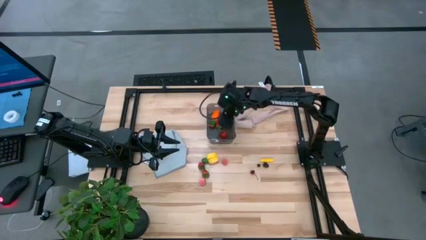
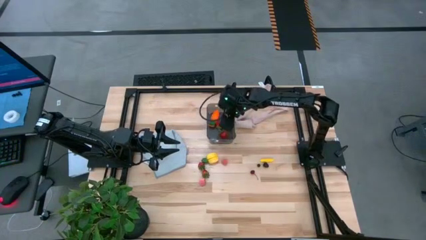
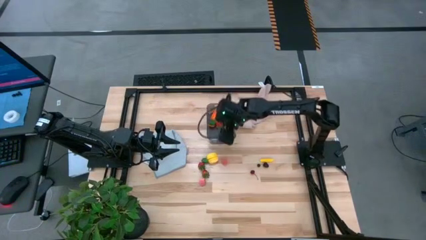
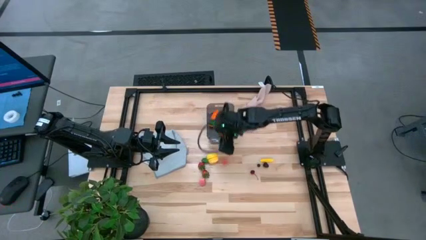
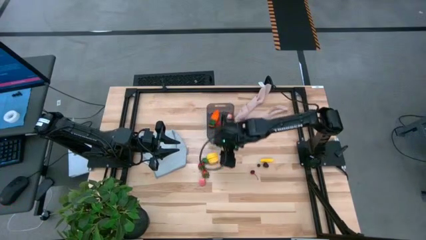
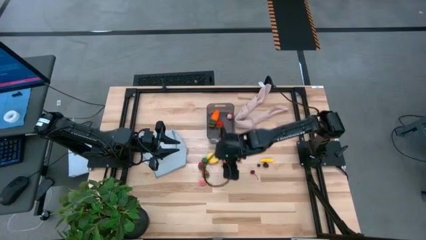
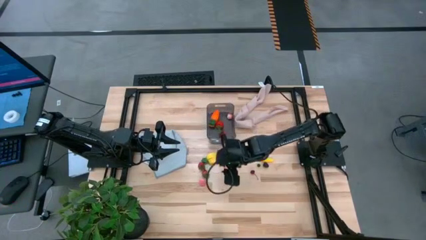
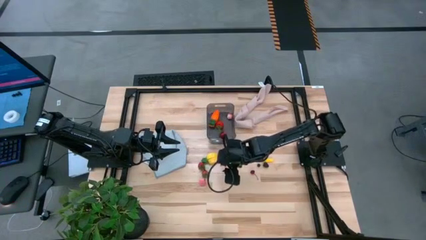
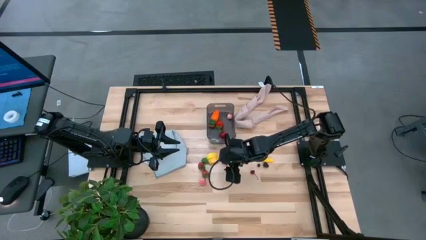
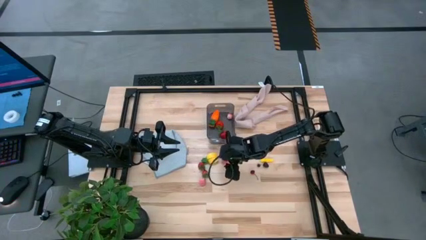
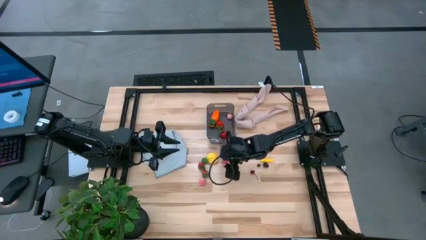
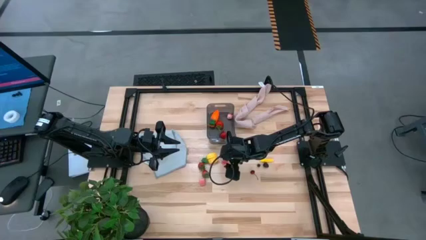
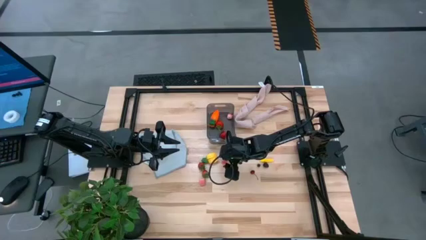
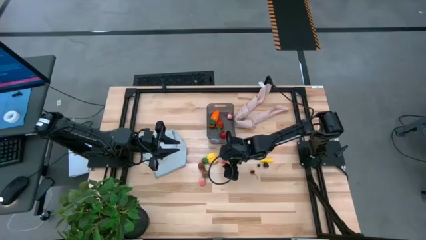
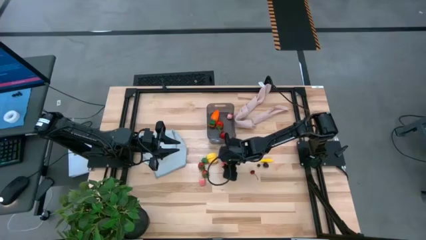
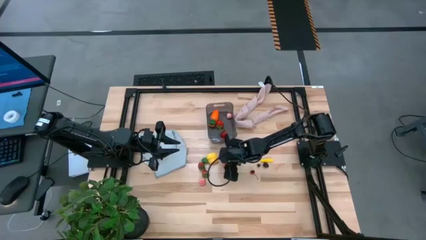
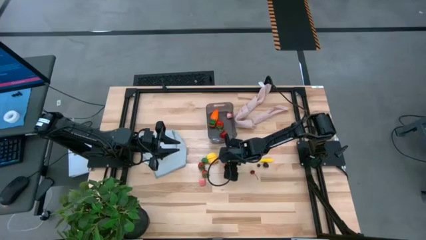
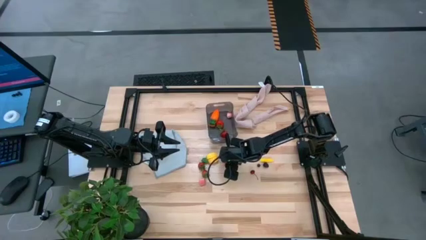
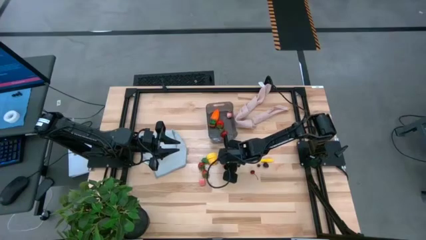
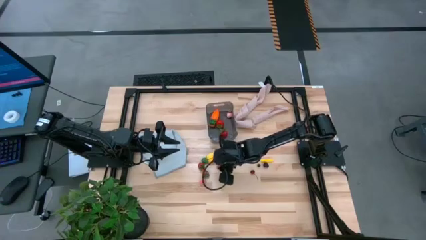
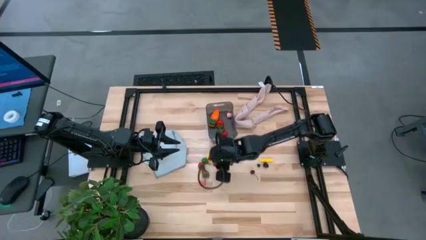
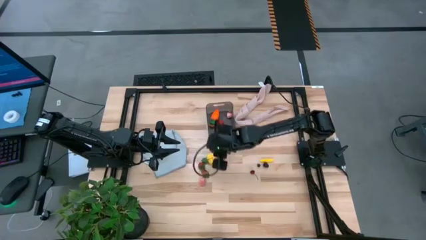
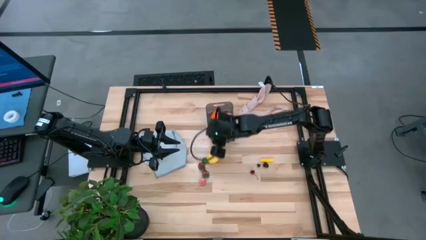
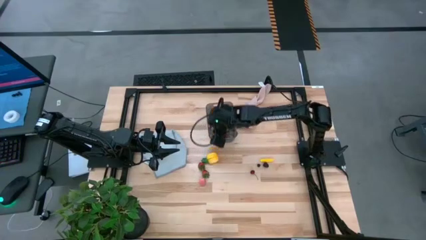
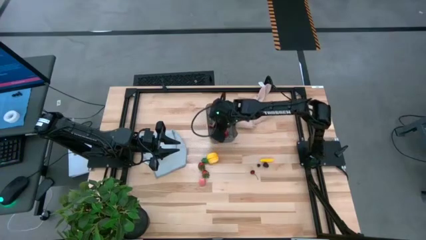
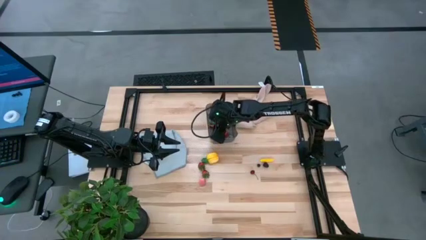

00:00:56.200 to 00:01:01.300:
Task: Pick and placing Produce into tupperware
Put the pink peach into the black bin

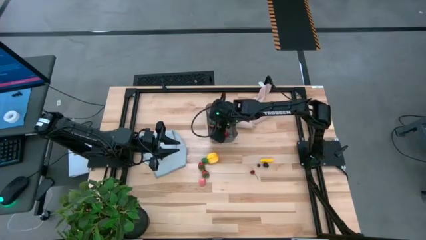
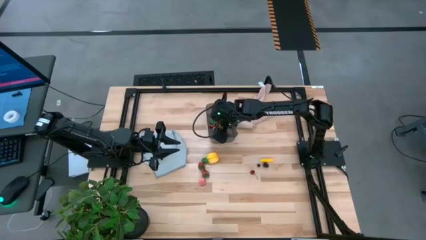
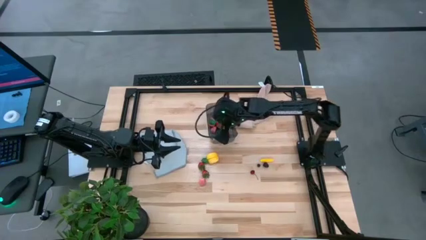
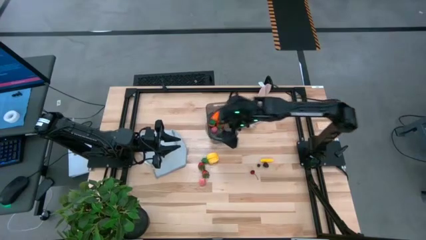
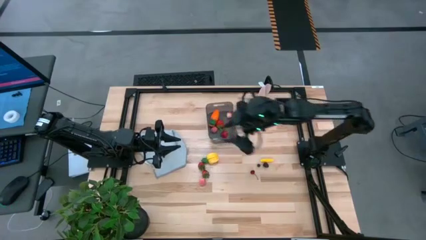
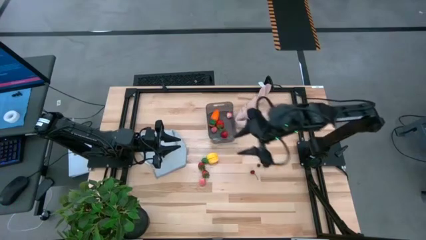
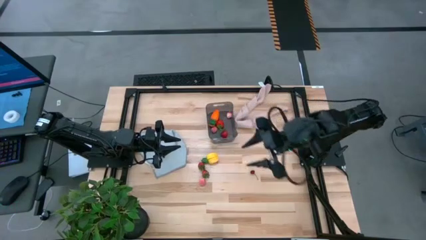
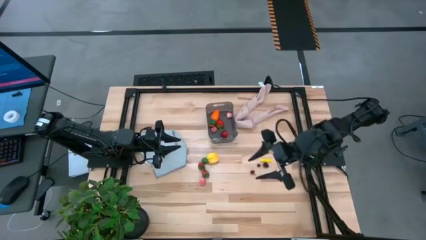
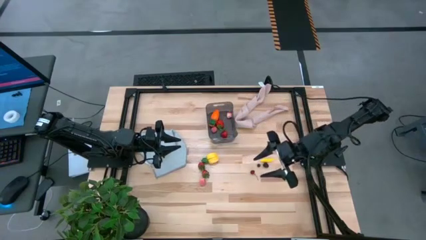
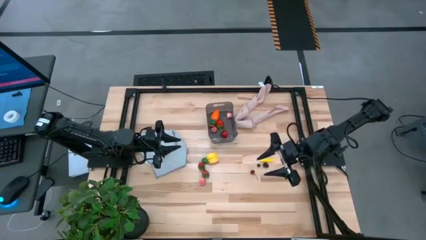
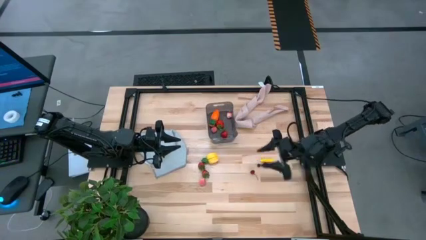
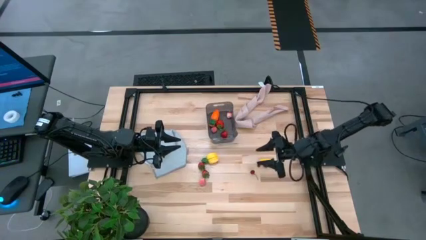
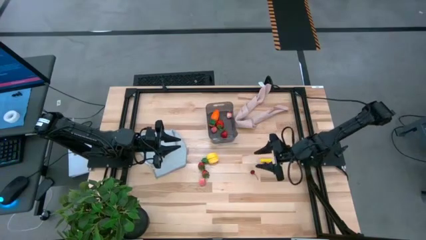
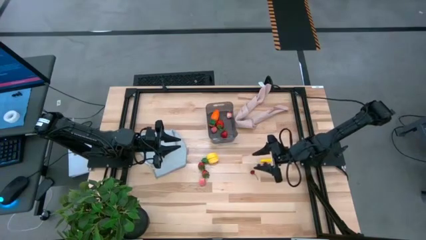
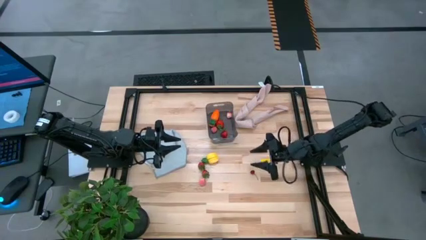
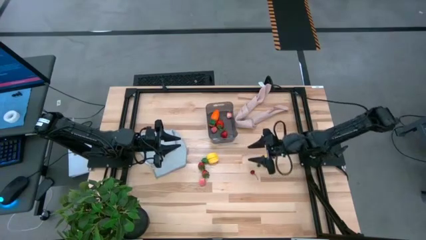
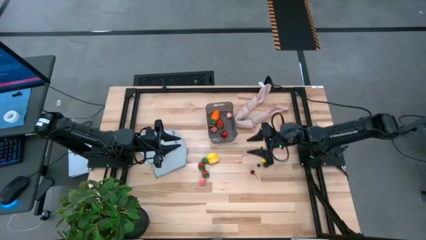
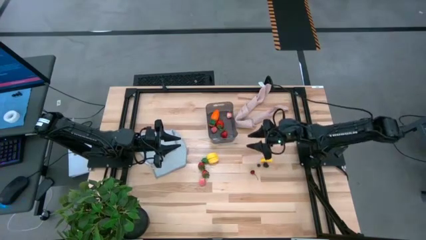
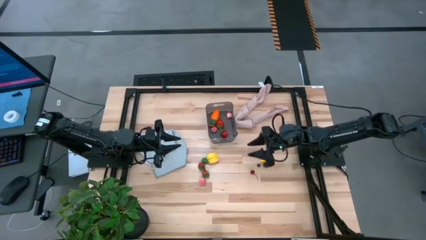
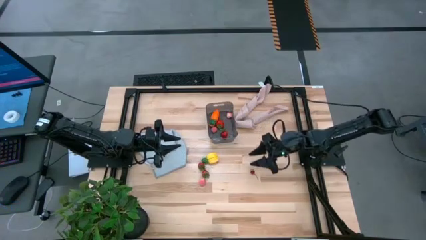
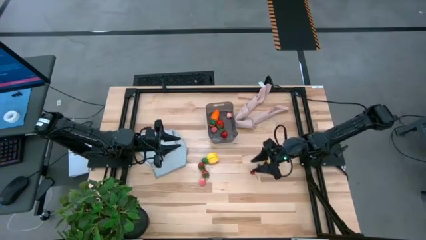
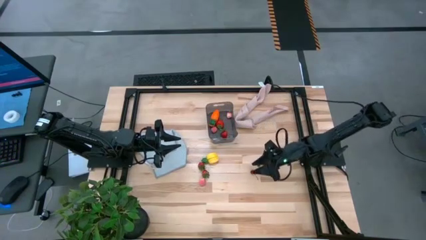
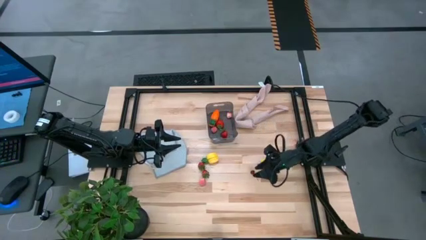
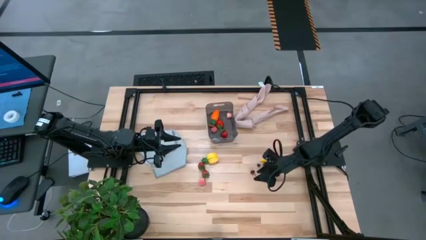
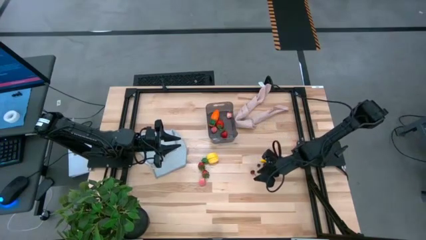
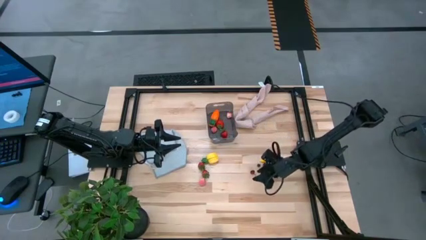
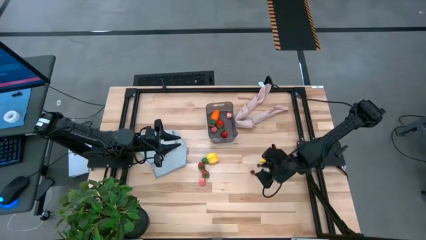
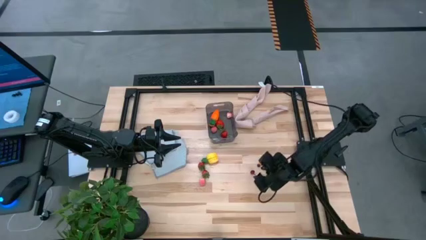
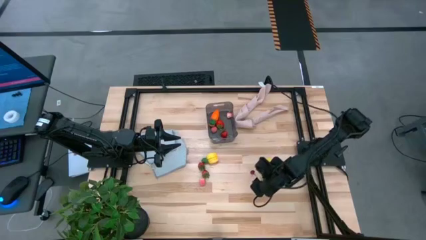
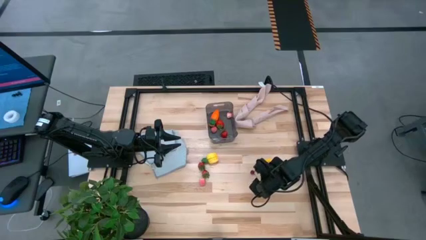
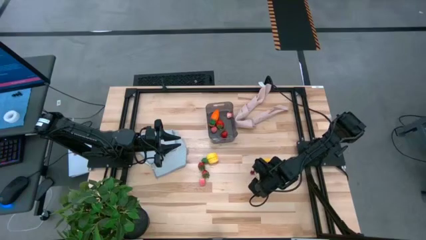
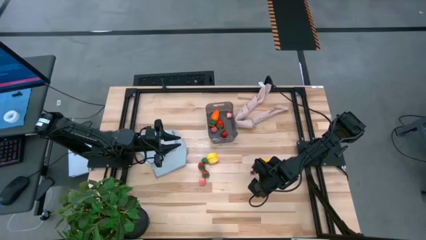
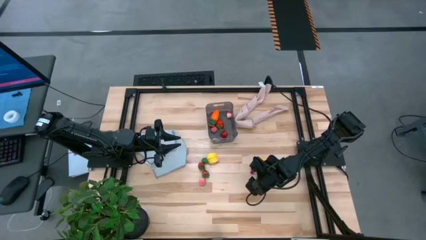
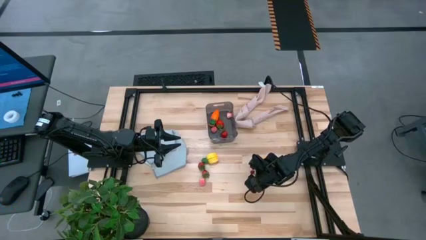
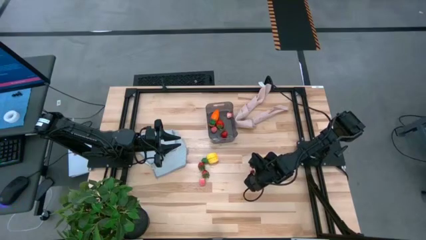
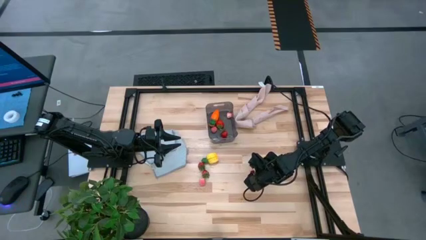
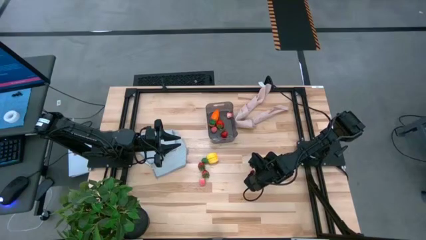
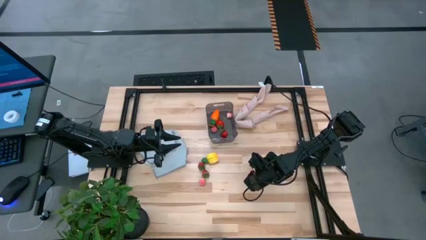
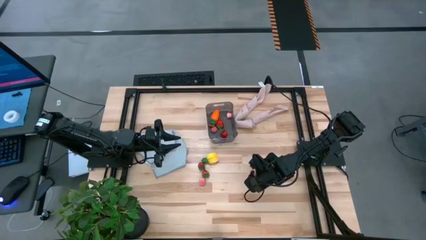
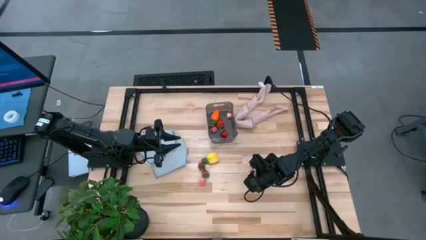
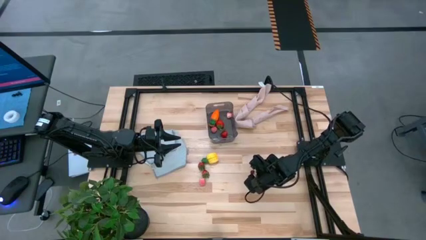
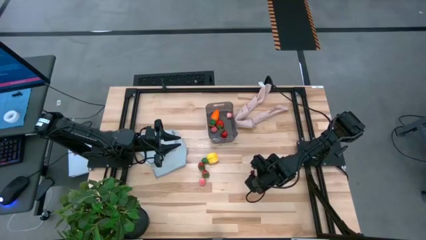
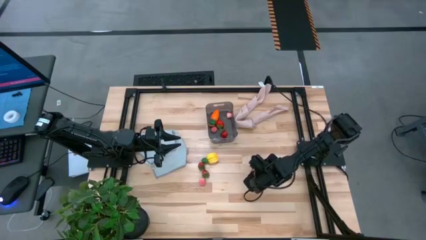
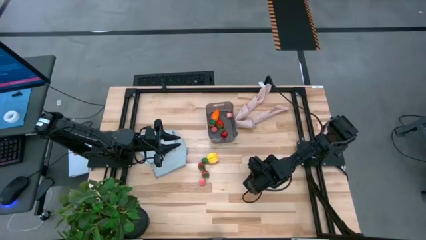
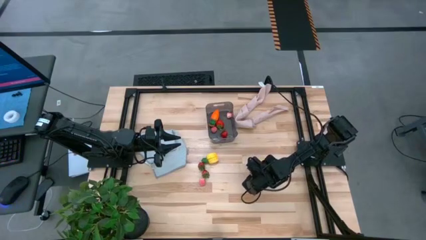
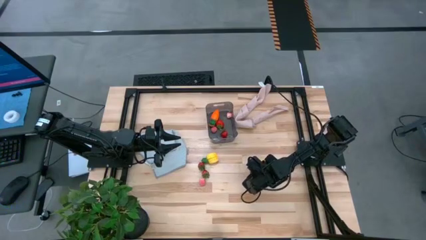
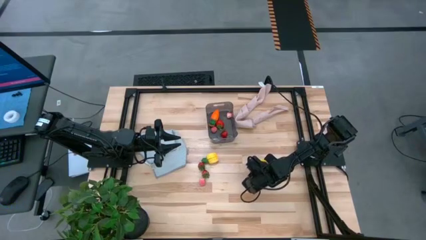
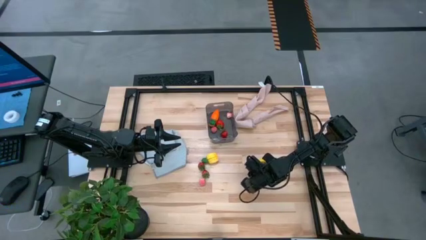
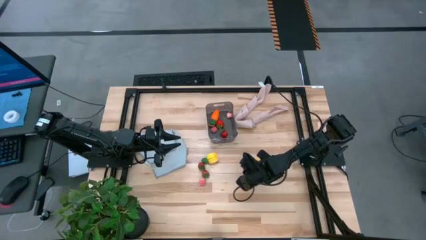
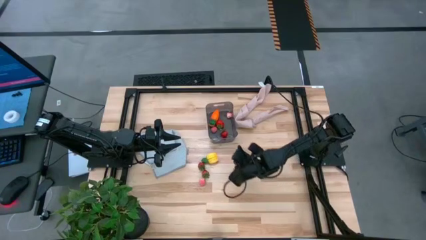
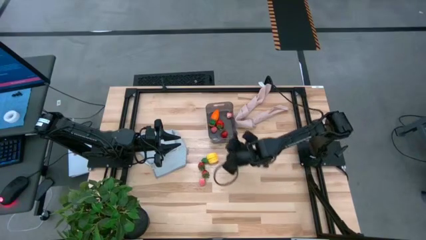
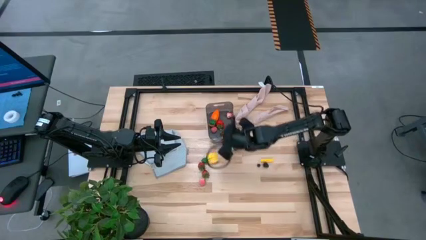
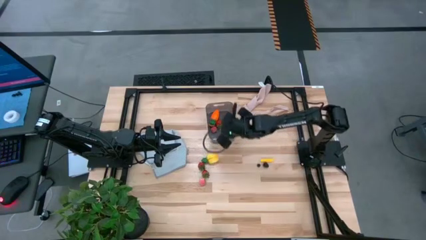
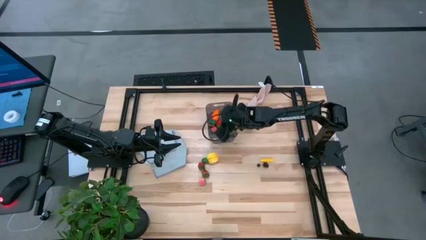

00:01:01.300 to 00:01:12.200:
Put the red cherry into the black bin

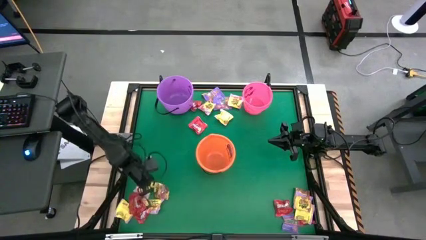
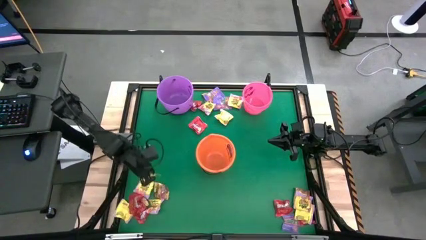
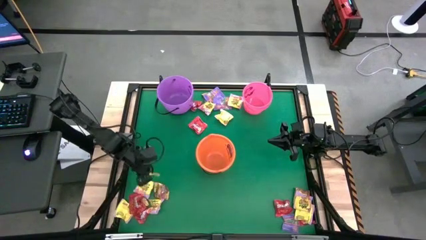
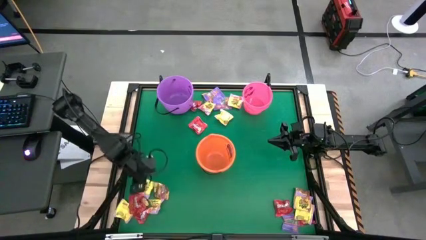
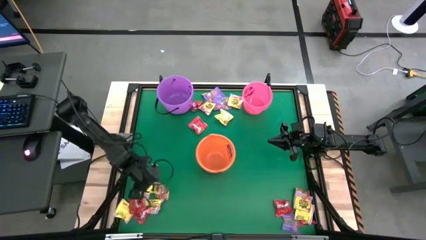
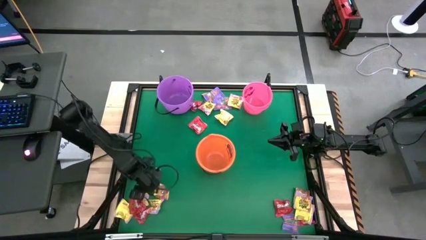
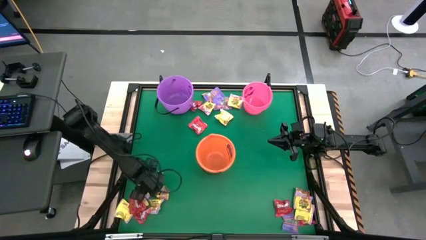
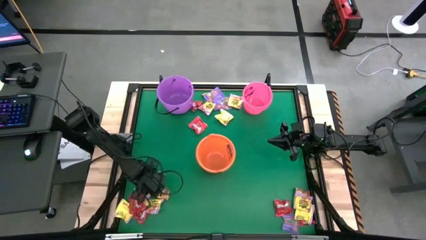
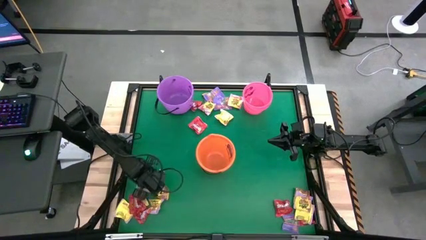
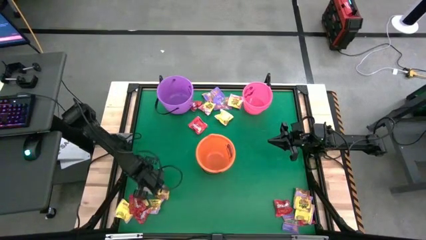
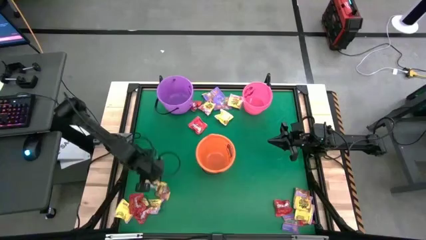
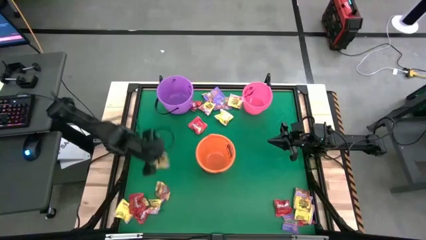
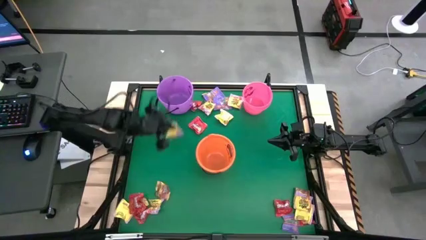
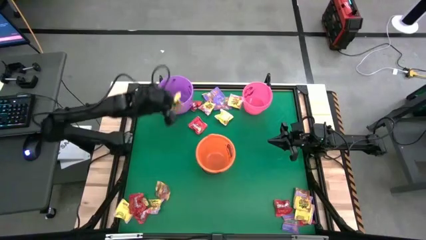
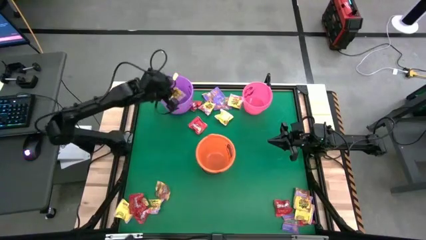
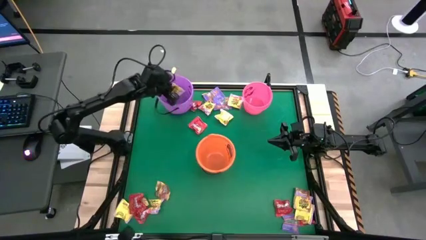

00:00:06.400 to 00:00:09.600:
Task: Sort candy by brand, put in halloween buckets
Put the yellow candy into the light violet bucket
